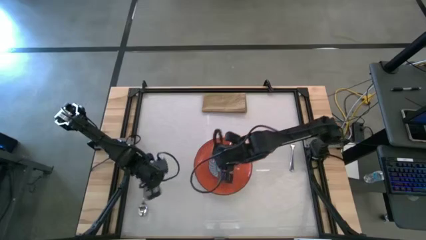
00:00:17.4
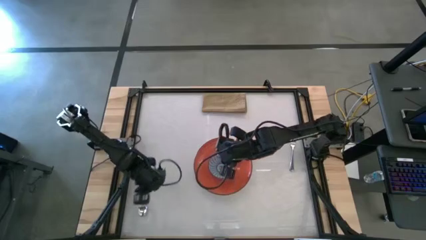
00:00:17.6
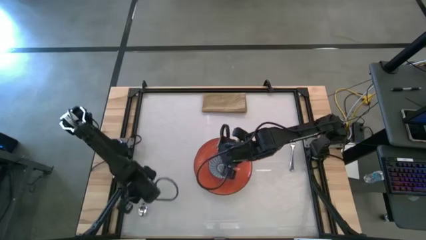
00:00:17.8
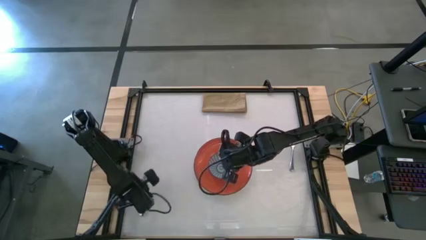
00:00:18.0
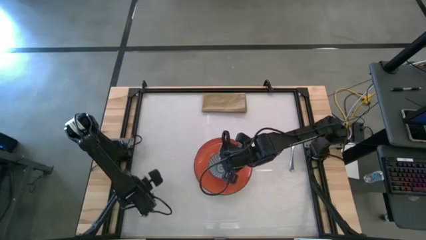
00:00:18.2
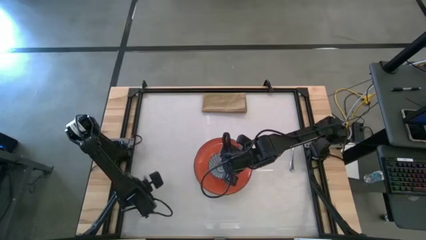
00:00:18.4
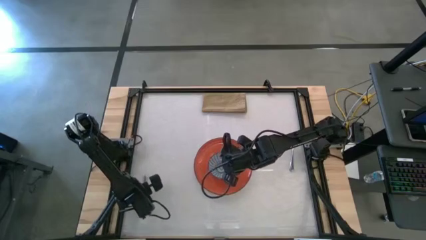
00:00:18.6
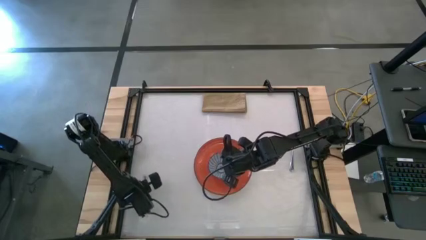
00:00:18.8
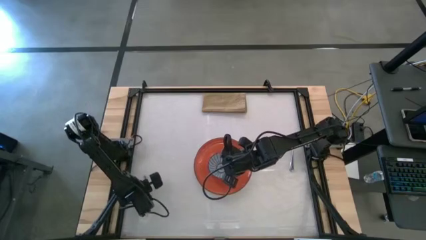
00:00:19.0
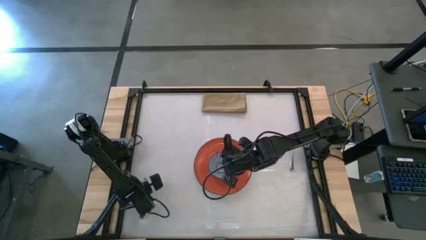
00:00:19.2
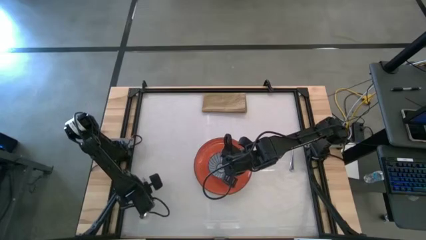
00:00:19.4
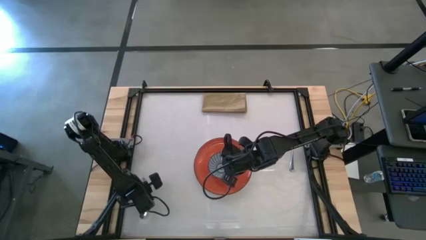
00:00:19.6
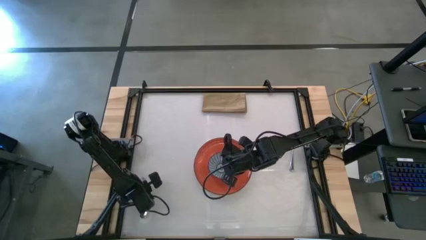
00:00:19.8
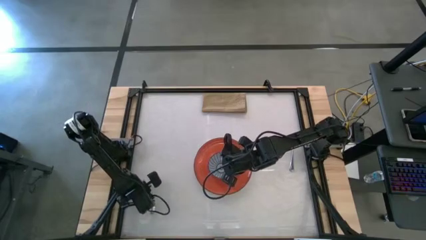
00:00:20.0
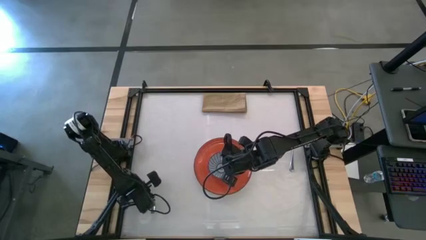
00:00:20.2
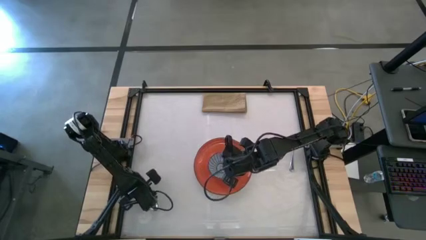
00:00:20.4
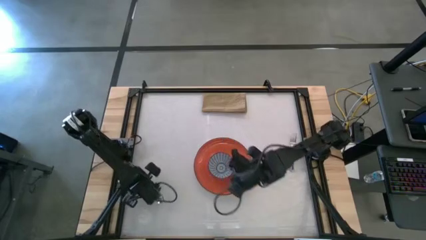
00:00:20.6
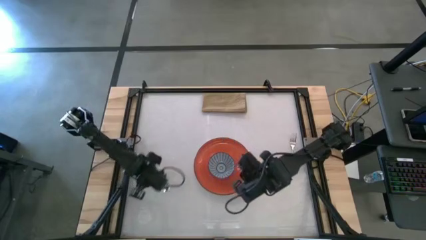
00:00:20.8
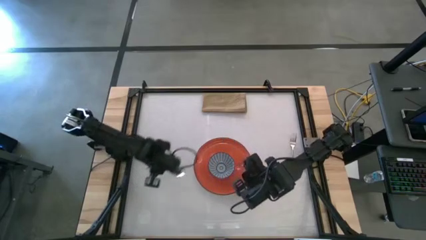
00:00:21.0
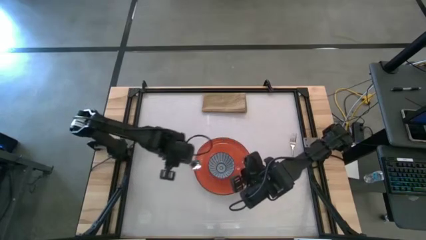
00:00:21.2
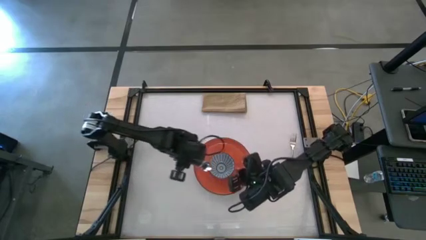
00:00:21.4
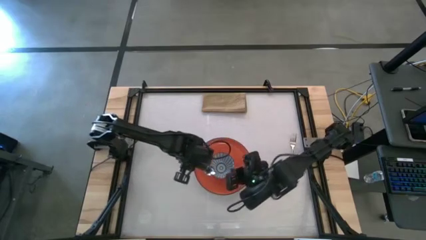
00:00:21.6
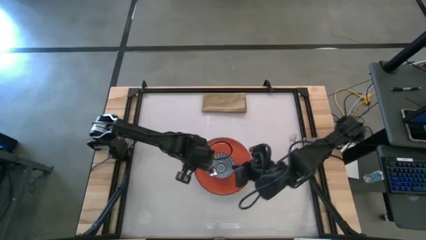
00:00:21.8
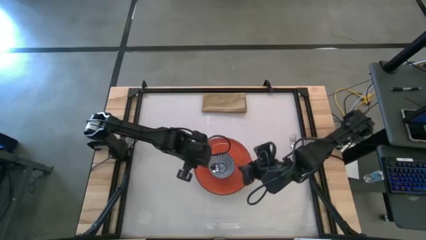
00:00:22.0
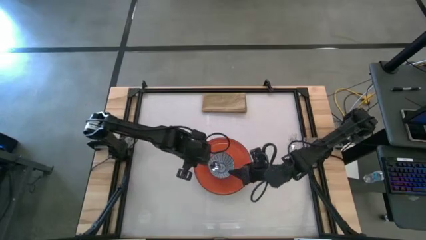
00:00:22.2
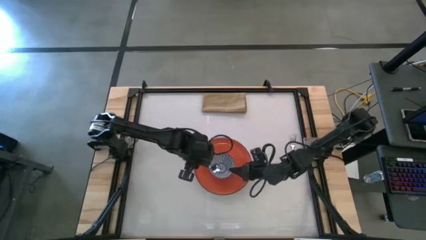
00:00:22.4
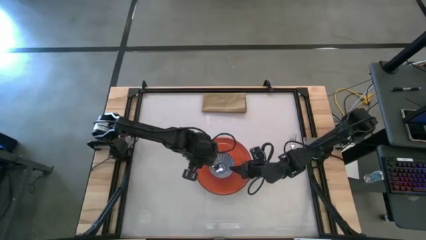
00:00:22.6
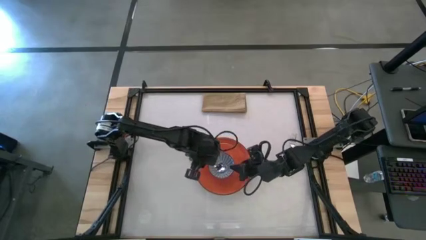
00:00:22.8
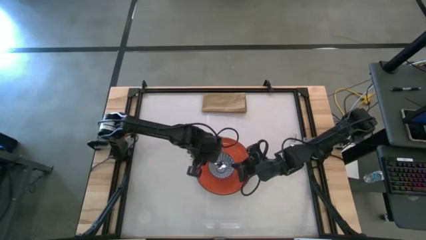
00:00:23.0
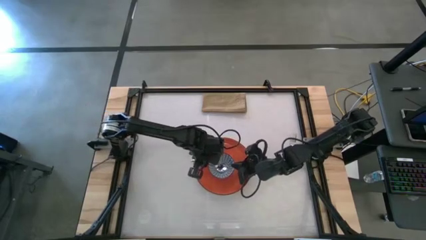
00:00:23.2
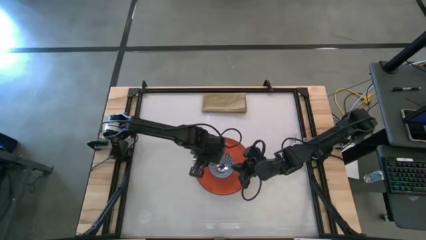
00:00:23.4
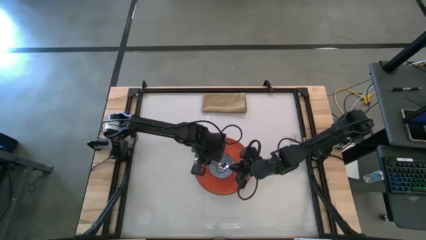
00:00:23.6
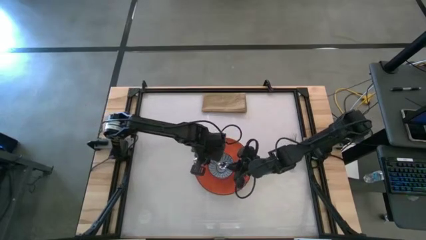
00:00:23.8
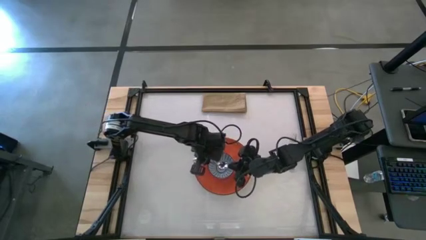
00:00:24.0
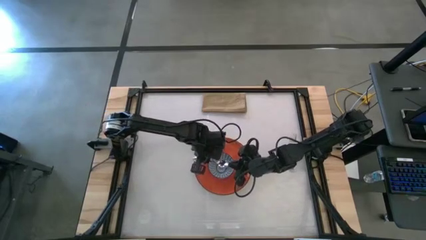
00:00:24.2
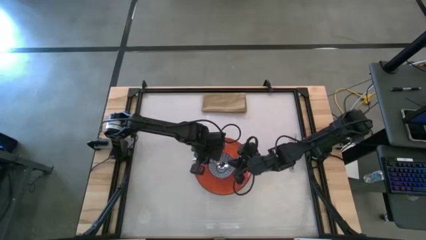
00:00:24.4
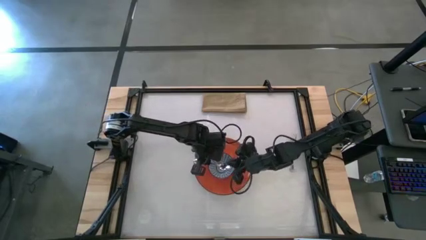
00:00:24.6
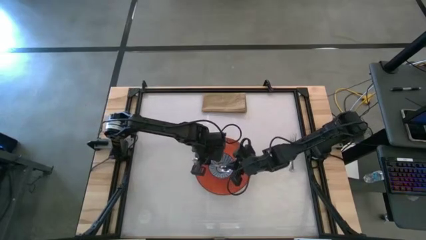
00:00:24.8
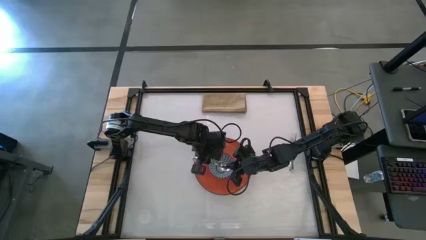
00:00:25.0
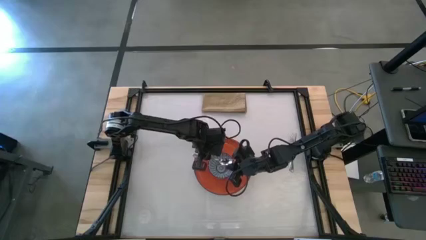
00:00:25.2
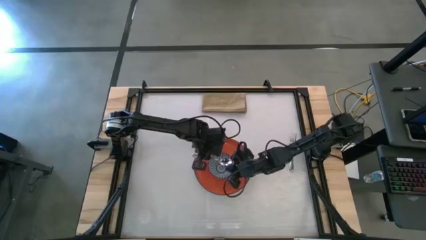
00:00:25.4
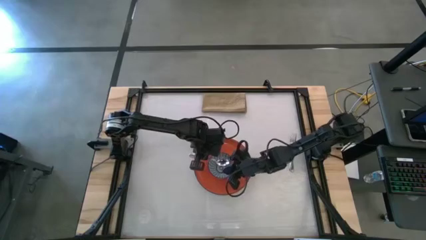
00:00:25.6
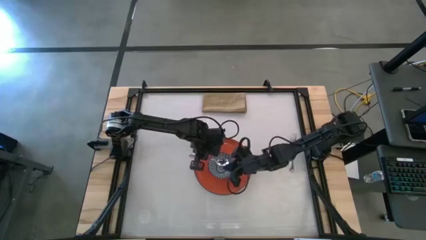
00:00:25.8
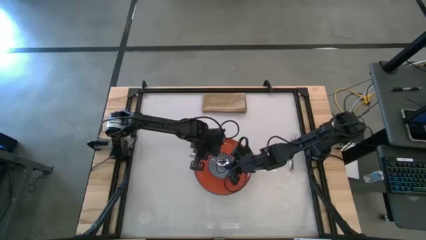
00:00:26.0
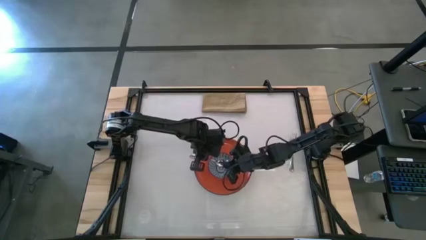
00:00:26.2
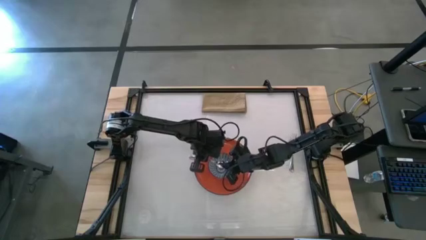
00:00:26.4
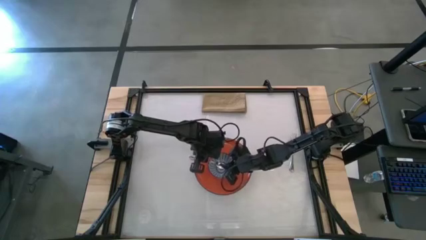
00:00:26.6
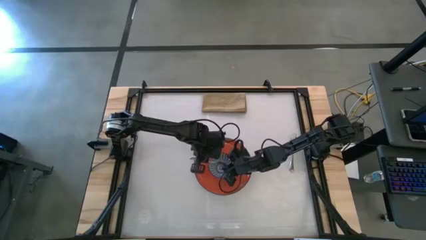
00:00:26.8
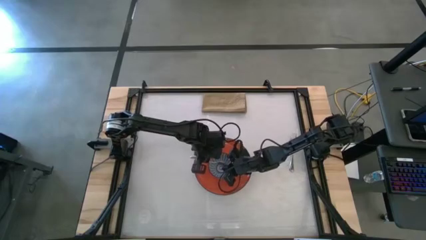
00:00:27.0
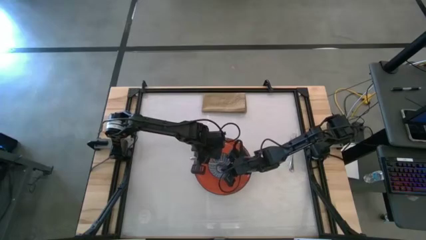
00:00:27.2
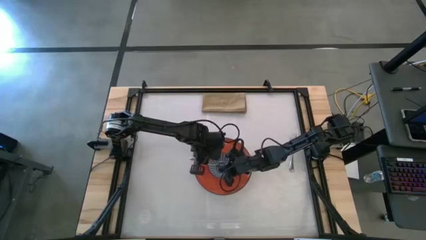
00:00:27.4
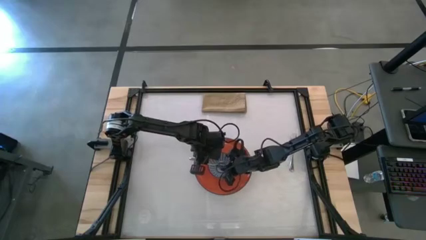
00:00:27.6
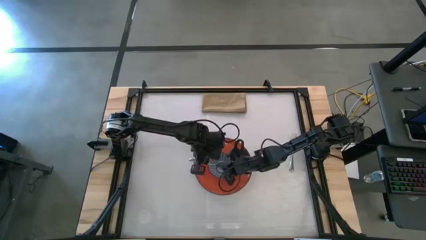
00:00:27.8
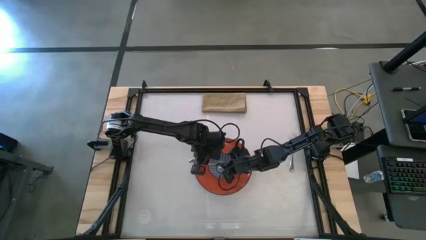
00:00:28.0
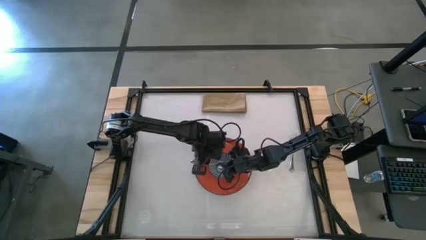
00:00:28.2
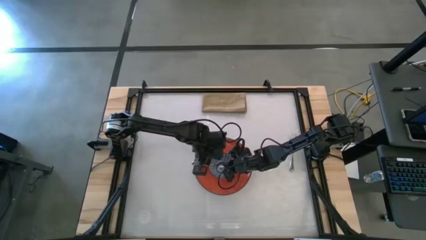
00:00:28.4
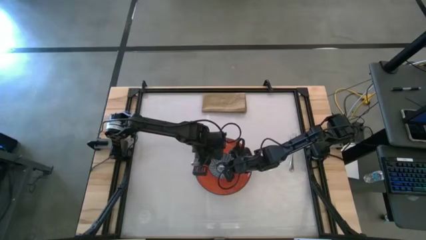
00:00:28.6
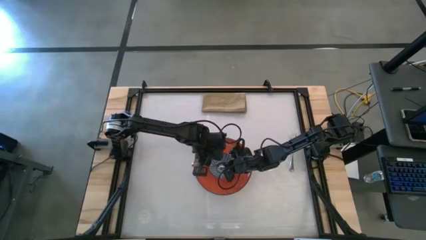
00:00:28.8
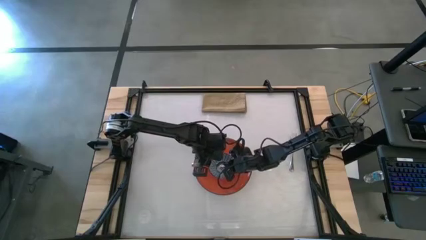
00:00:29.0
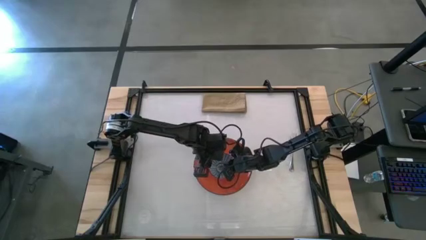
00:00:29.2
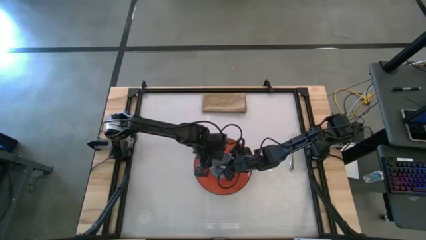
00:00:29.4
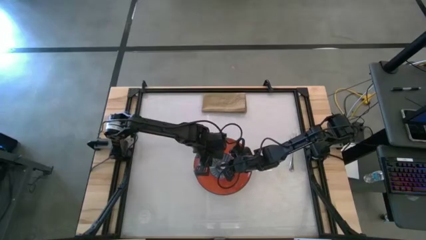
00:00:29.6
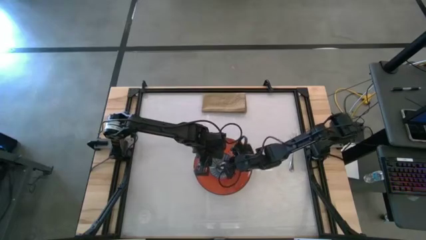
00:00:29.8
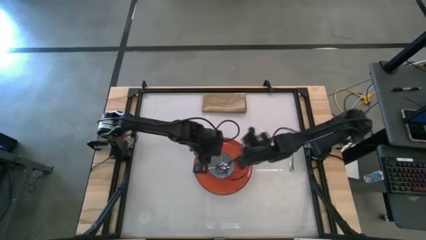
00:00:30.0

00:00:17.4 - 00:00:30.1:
Task: Set table place
Put the spoon into the bowl

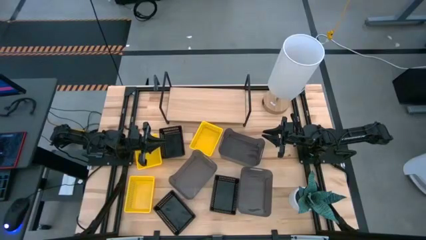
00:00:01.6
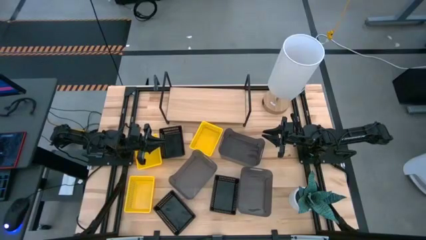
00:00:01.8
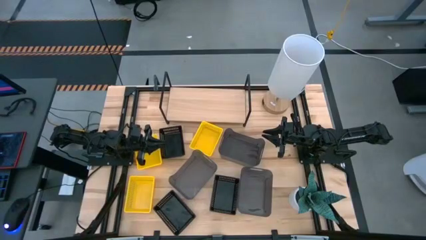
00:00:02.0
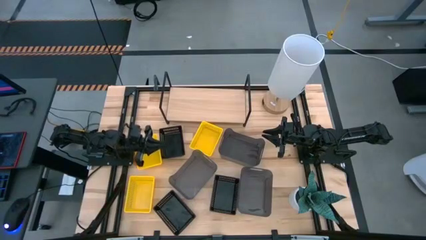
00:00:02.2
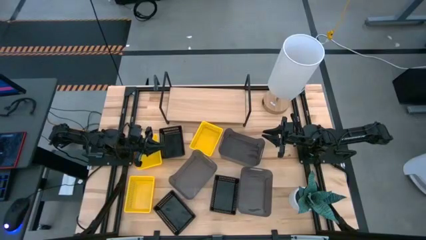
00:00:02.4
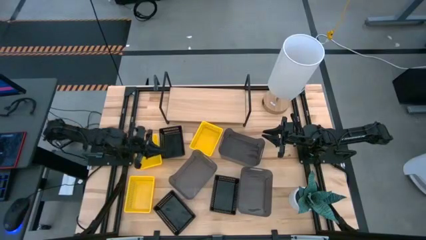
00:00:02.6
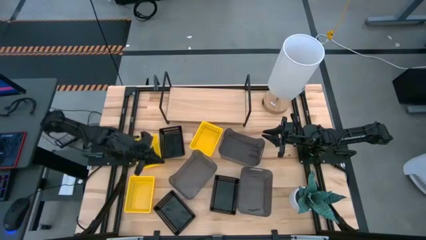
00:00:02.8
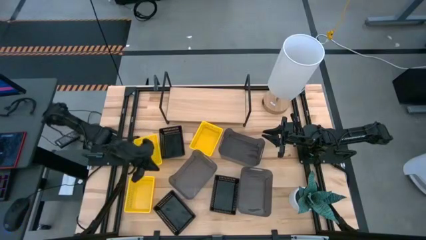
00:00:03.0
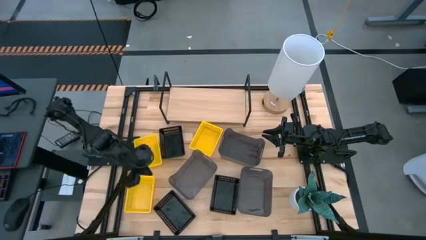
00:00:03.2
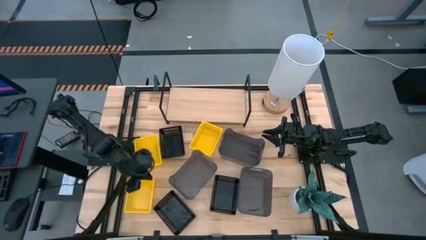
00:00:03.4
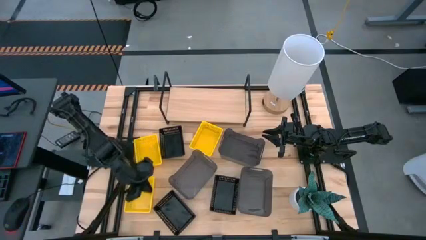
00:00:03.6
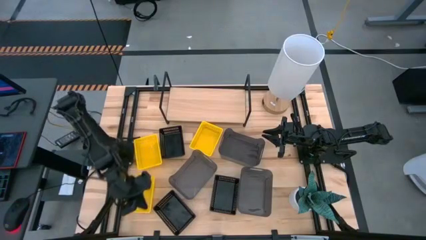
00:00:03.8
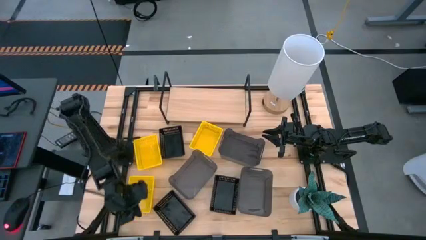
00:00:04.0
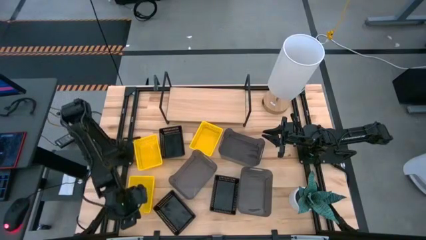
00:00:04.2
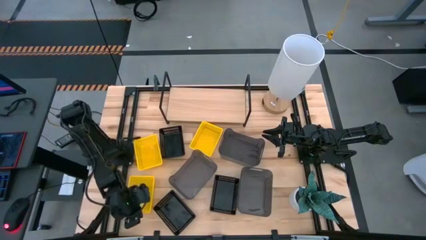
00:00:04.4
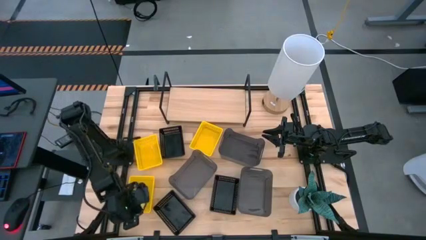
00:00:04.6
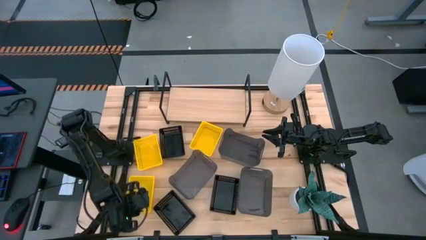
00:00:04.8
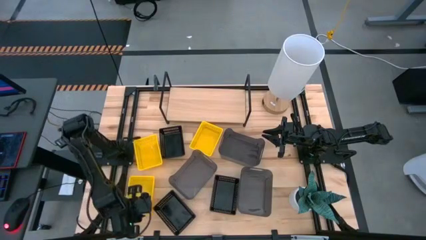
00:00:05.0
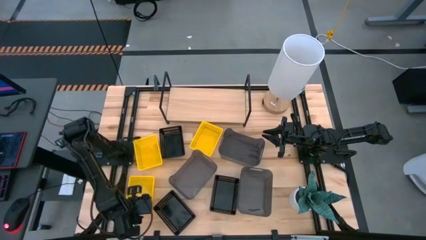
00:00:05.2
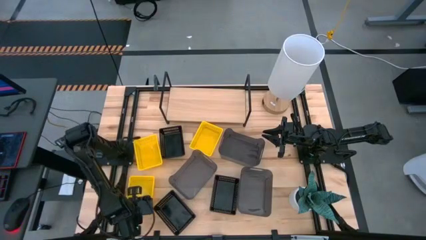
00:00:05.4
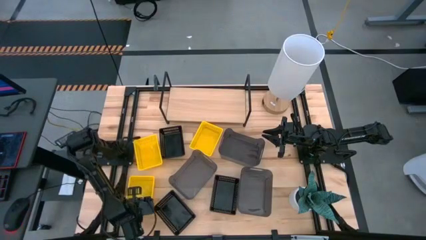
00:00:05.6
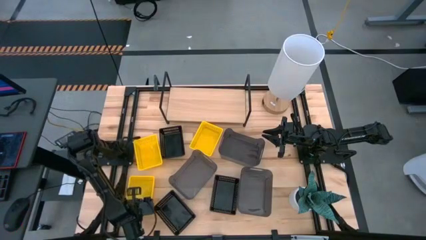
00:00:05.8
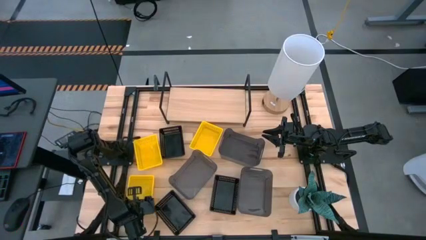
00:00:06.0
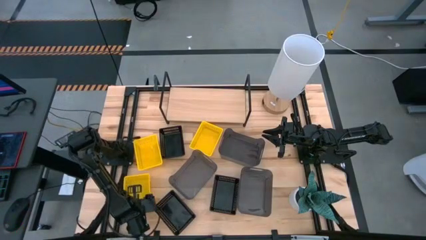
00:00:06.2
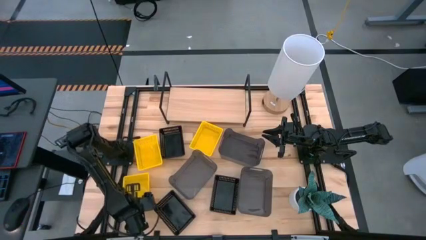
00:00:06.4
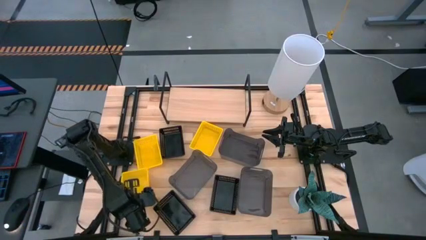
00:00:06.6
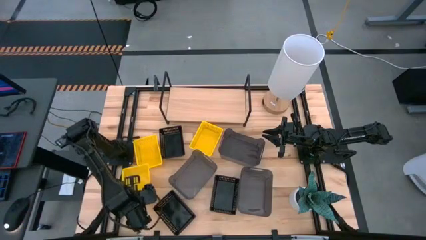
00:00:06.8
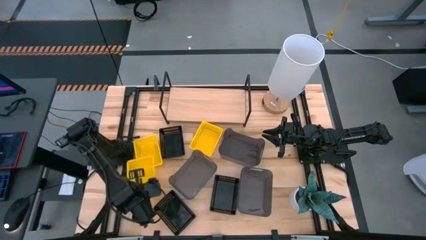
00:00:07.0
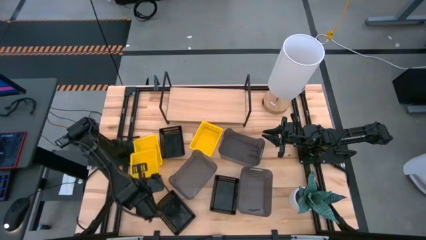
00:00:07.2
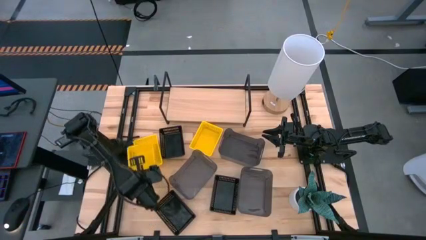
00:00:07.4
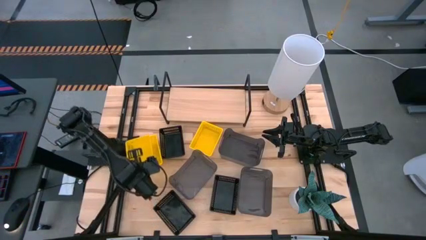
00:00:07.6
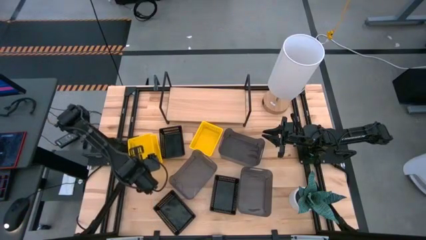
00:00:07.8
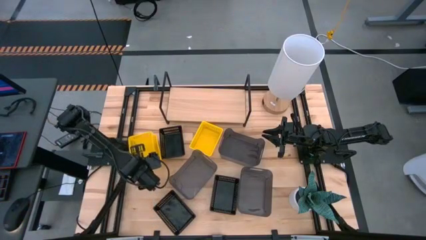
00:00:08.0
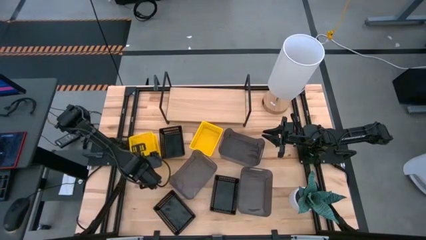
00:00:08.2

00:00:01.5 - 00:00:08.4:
Task: Stack baskets on shelf by color
Stack the bottom yellow bin on the top left yellow bin
